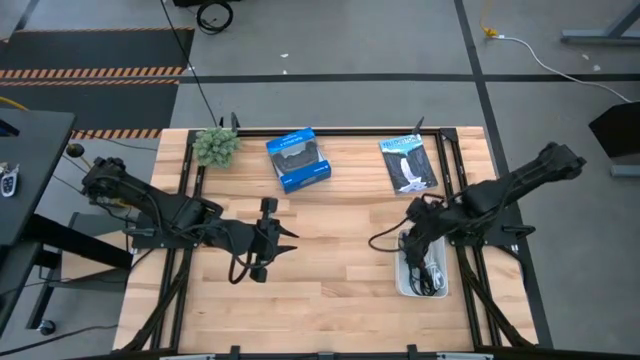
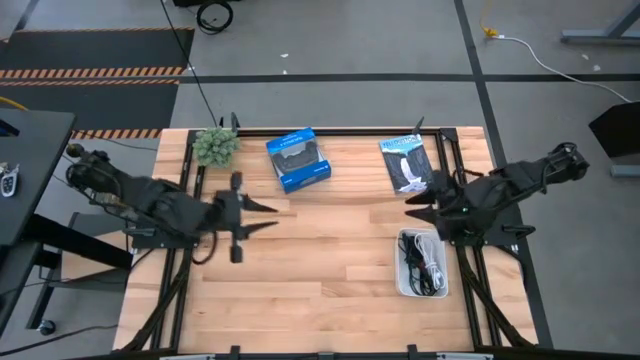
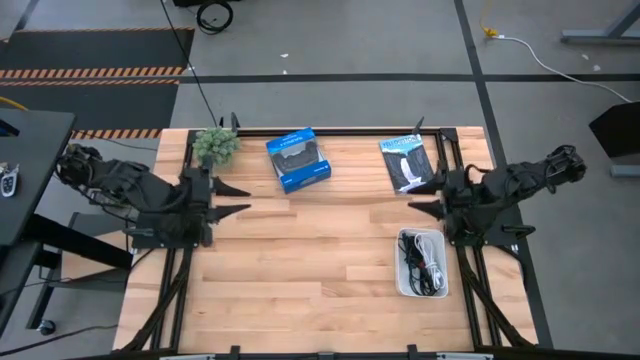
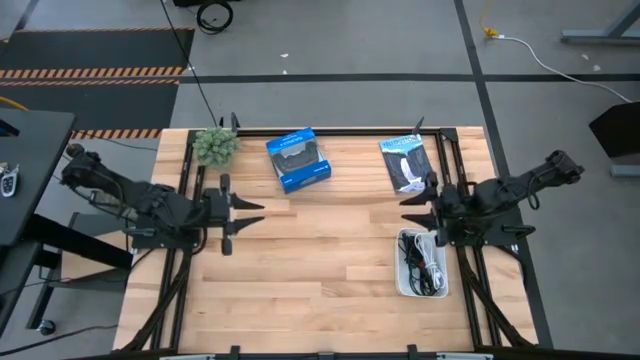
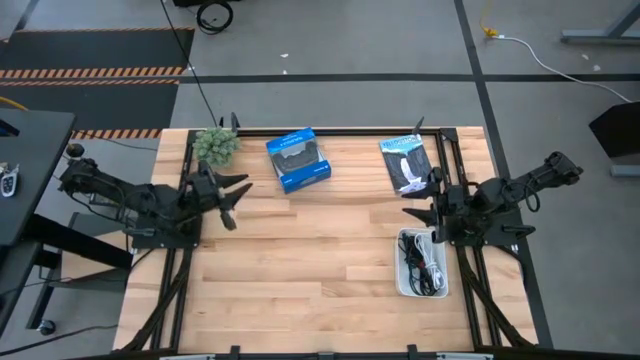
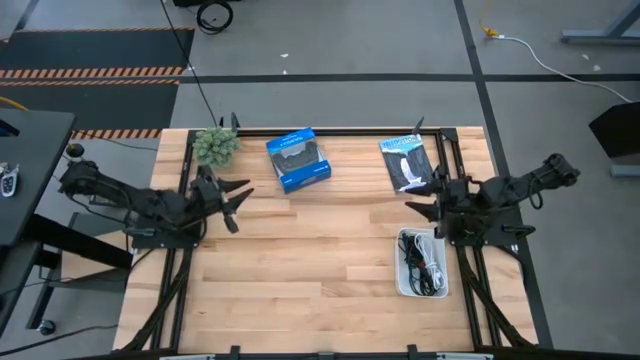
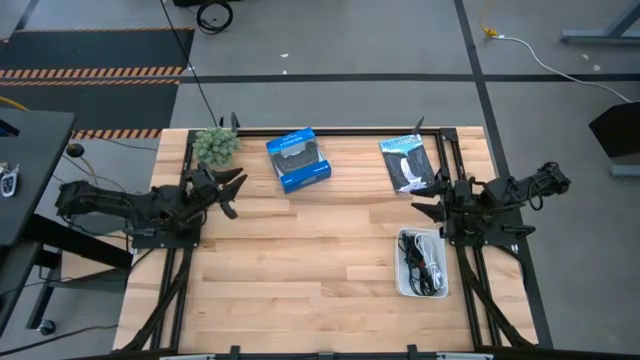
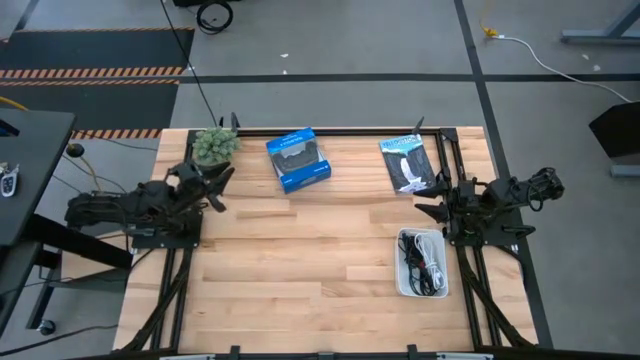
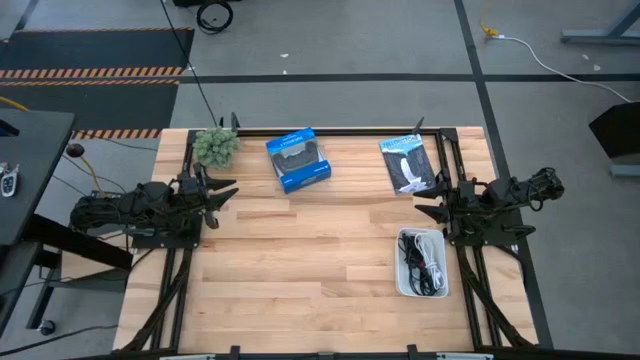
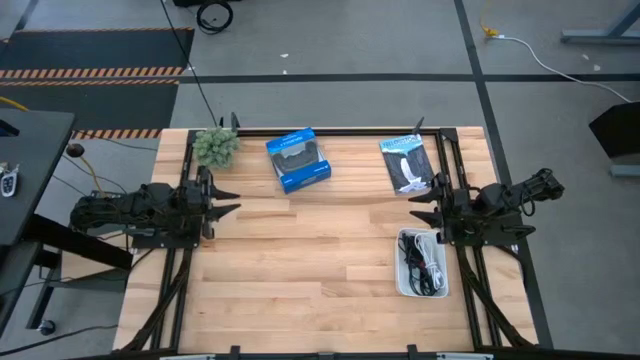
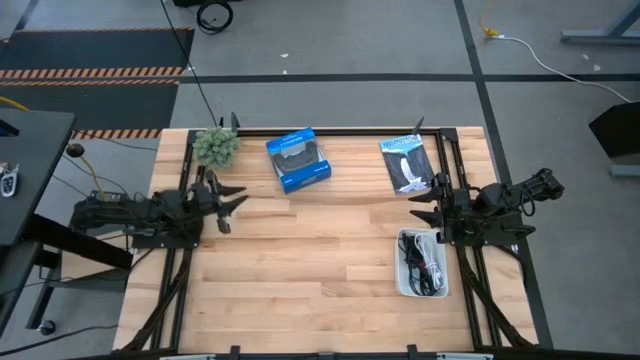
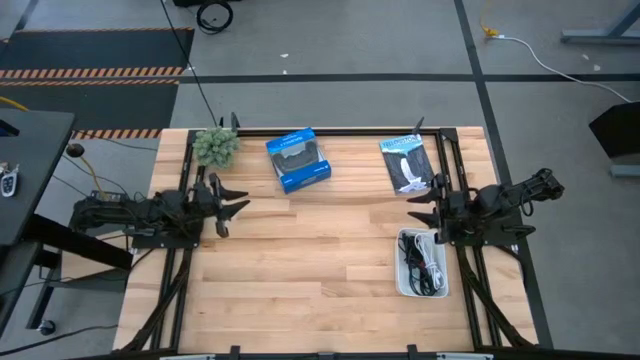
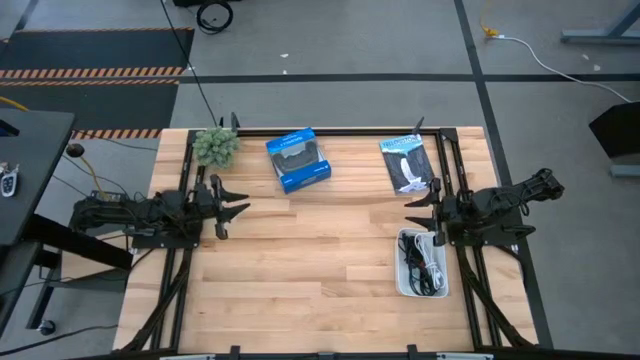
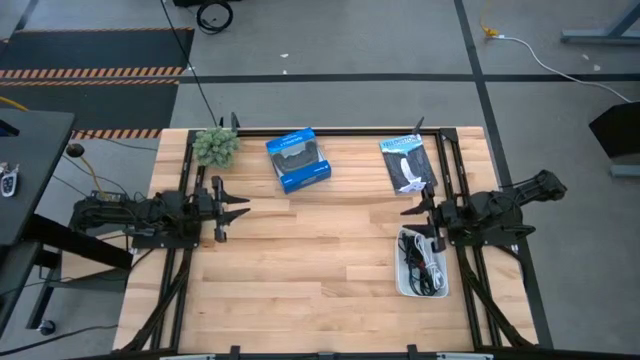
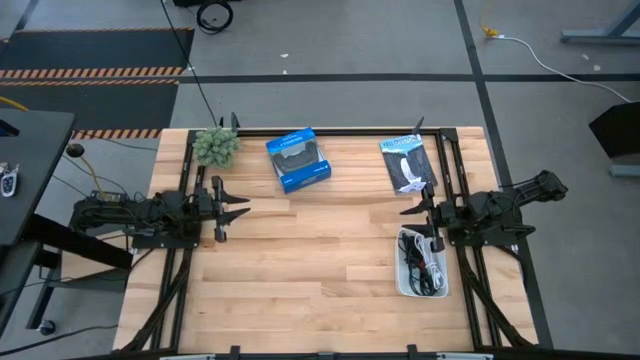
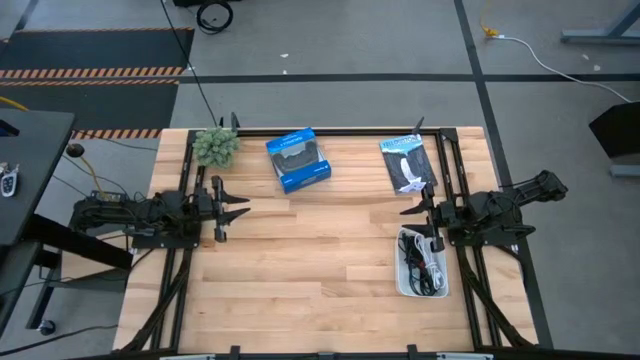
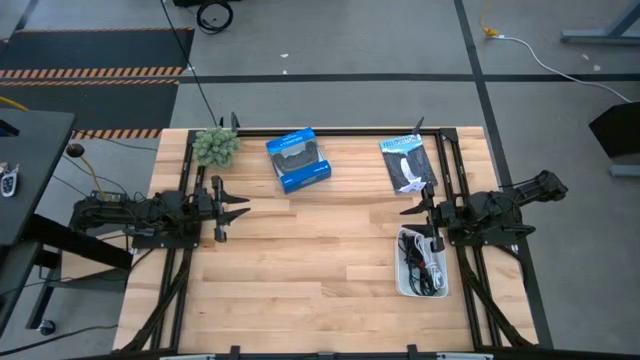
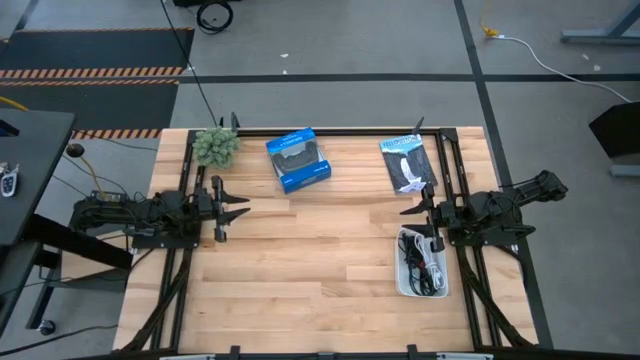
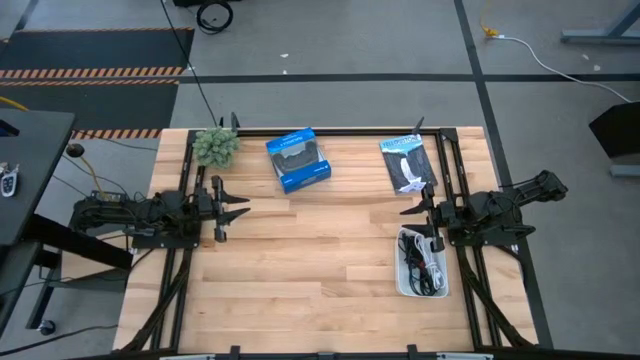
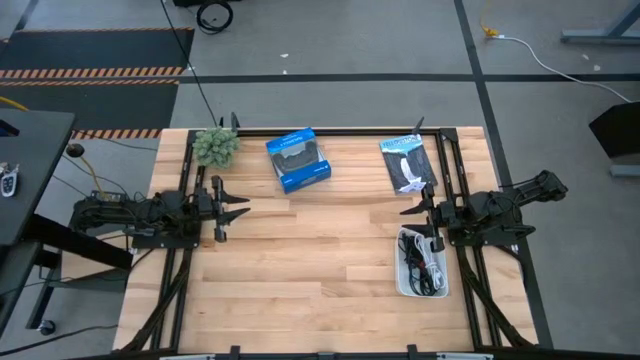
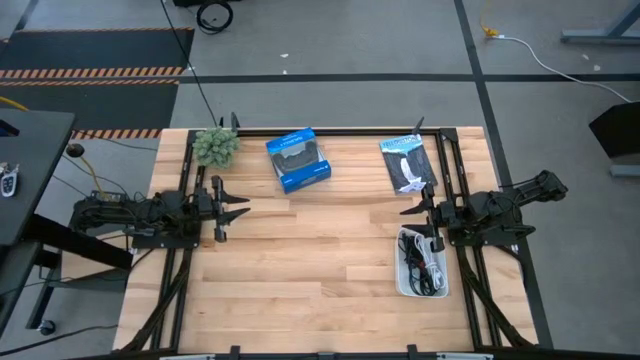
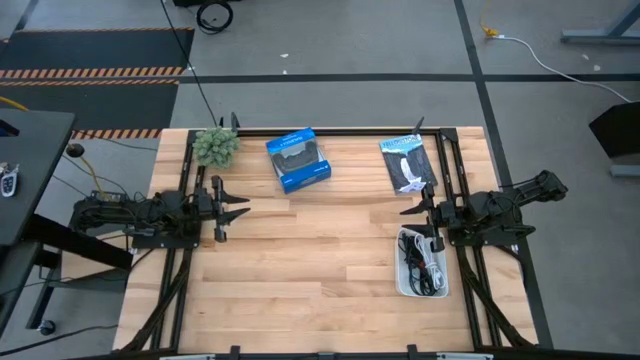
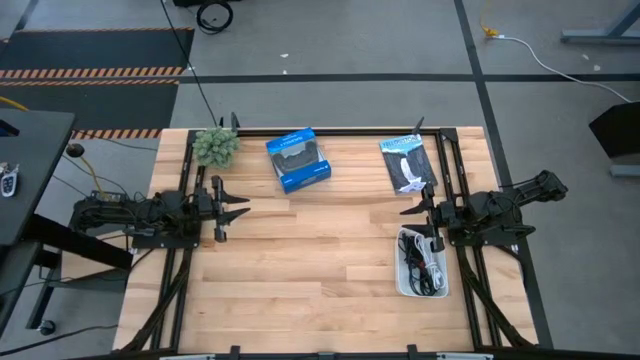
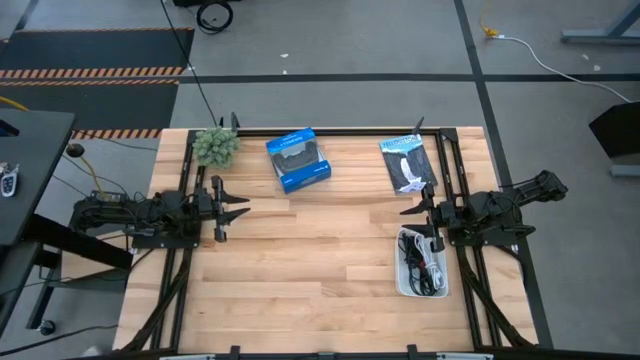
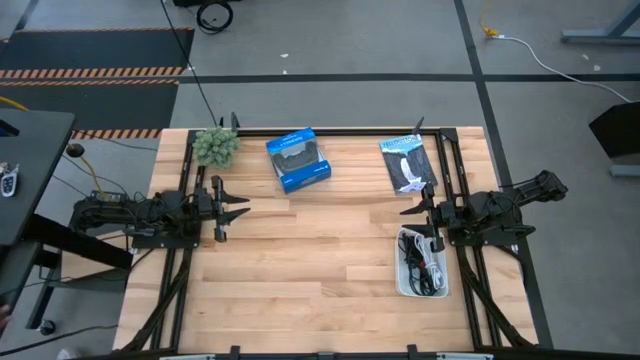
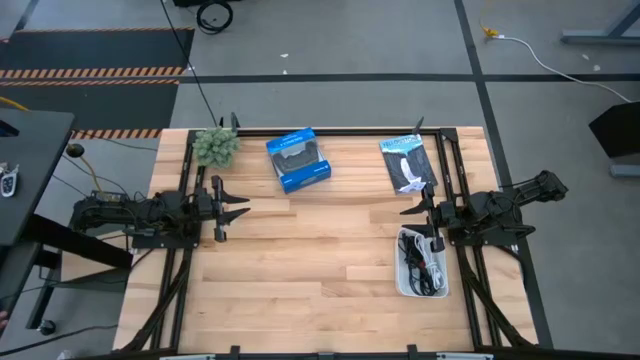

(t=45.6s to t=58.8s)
Task: Pick and place USB-C Cables
Return to Home Position

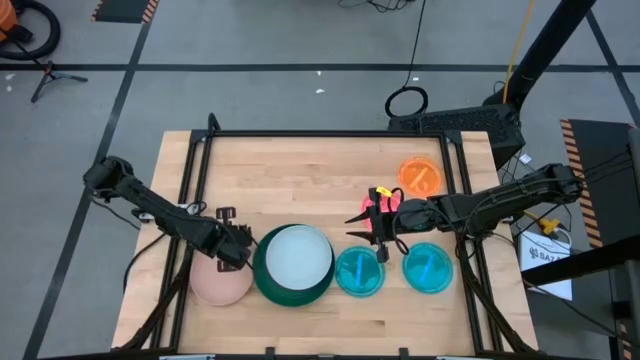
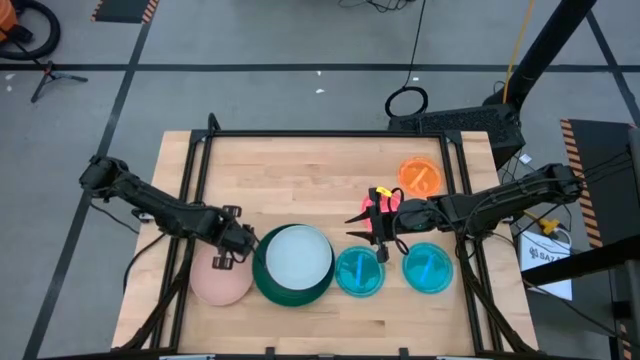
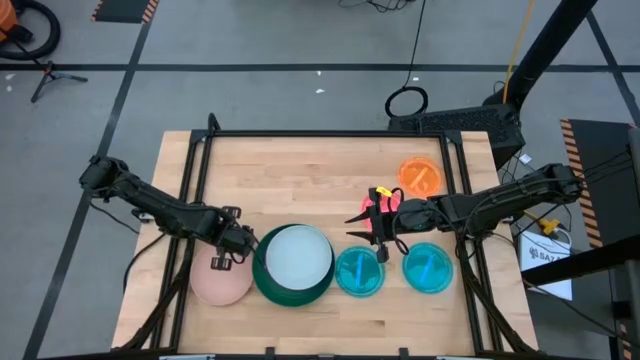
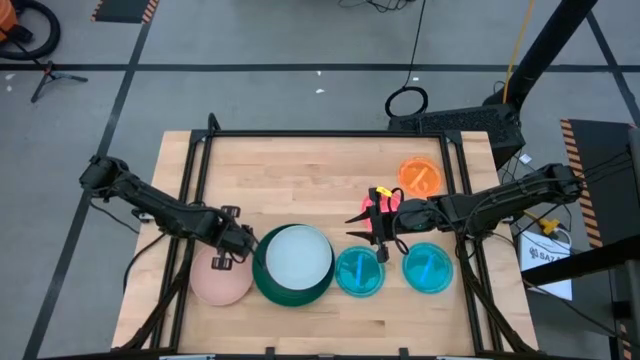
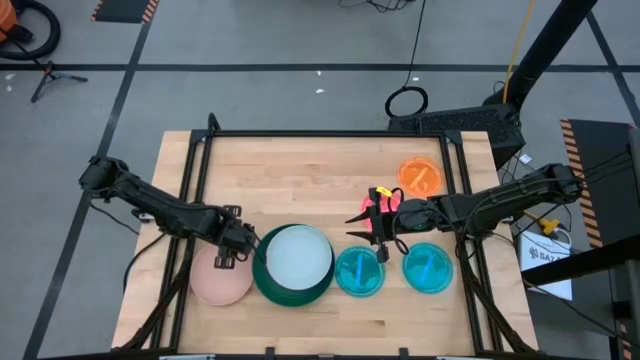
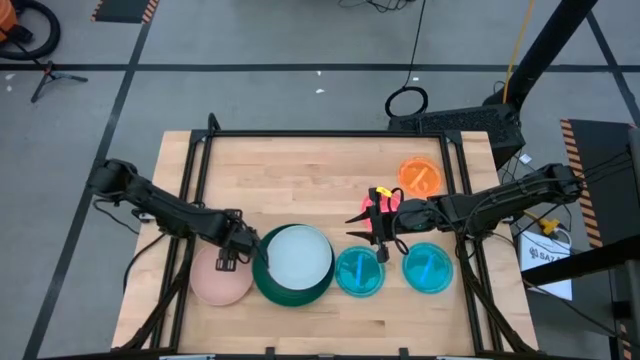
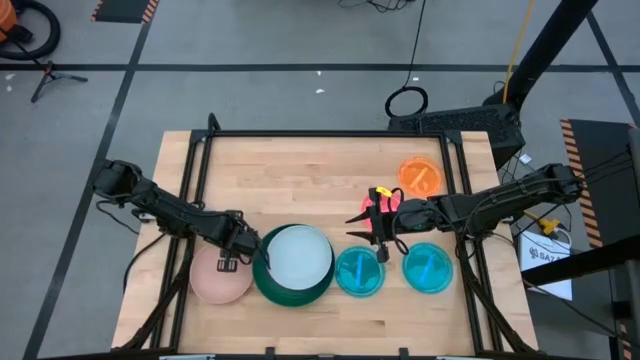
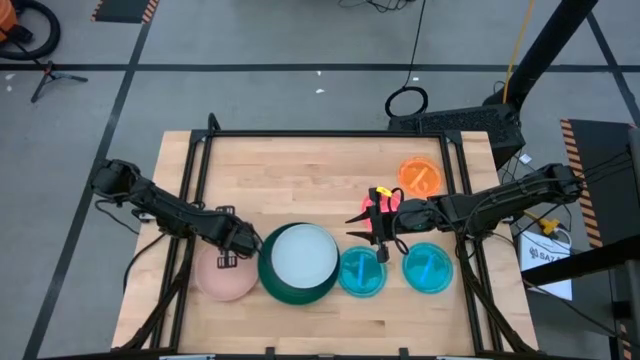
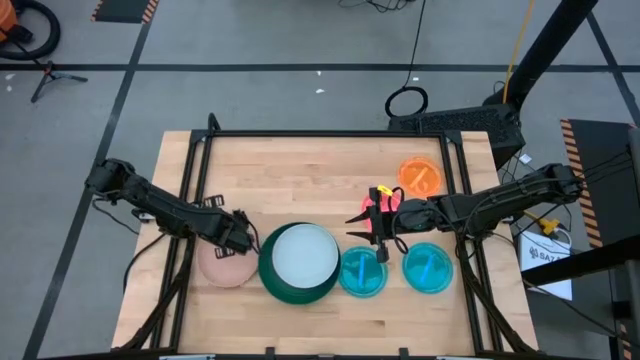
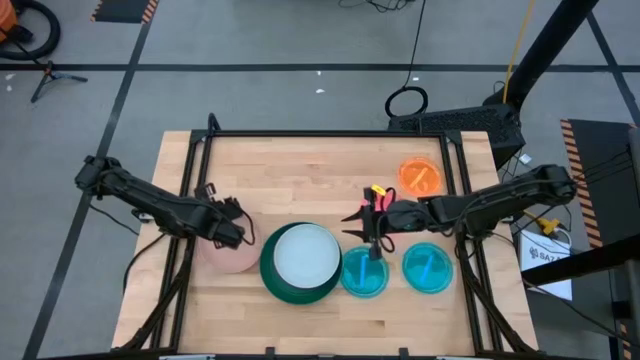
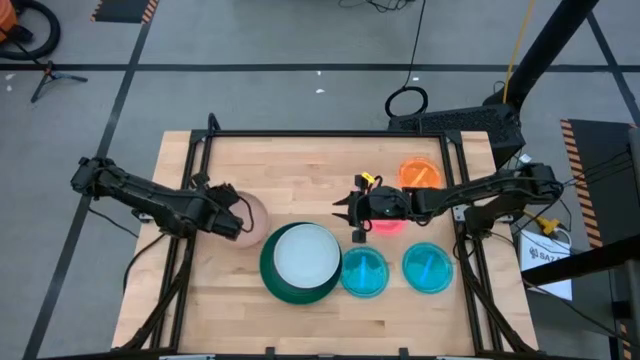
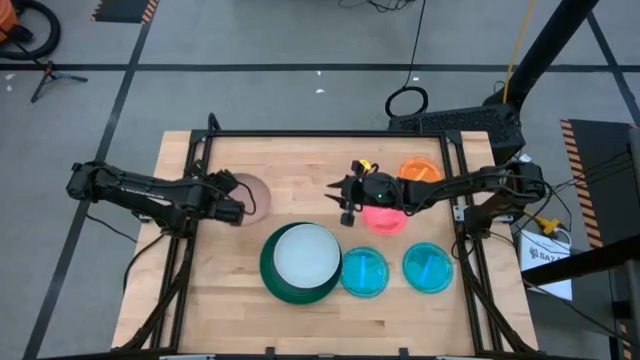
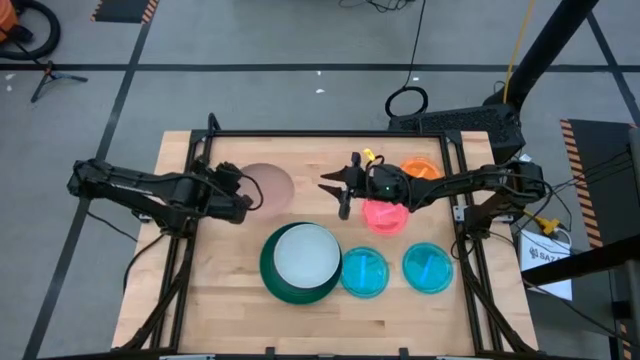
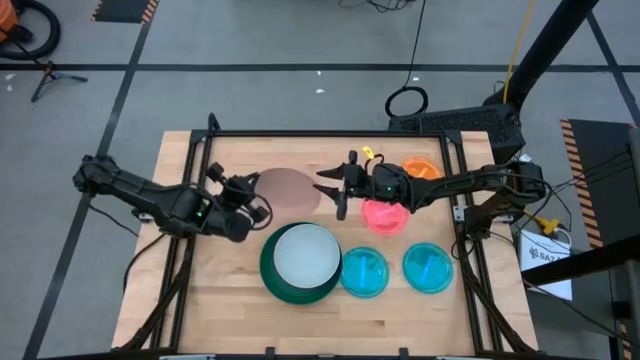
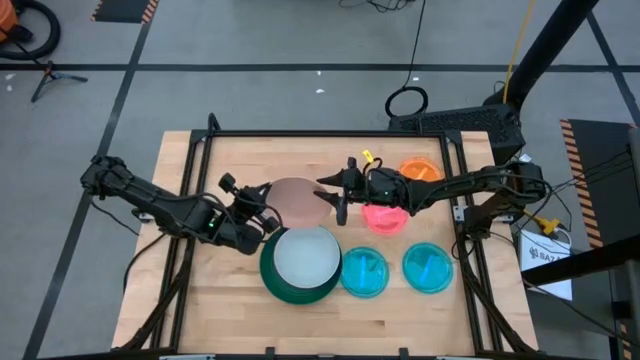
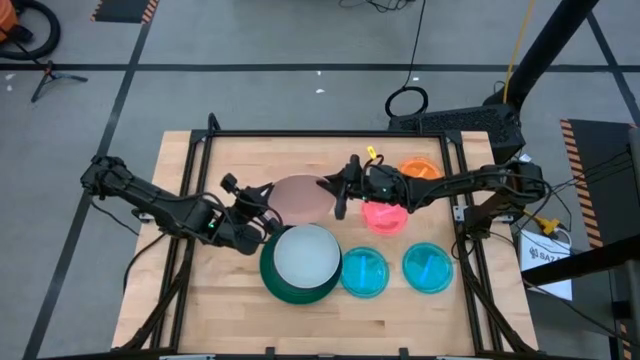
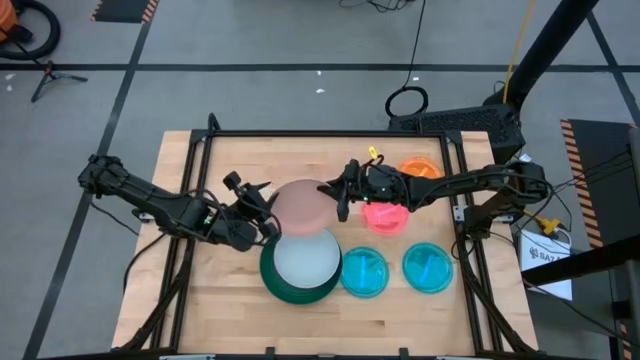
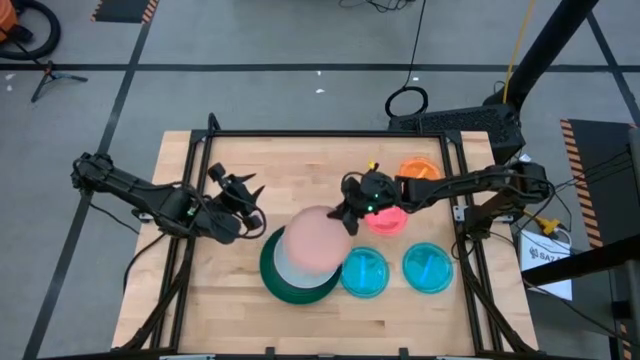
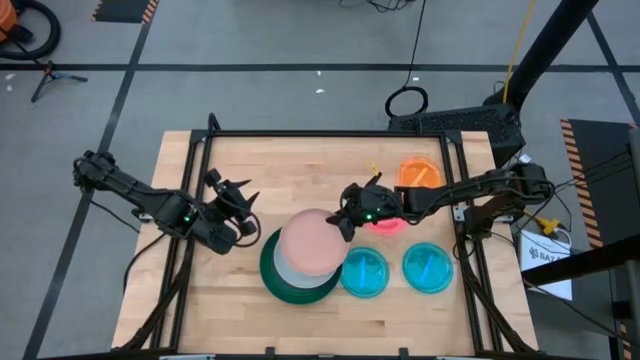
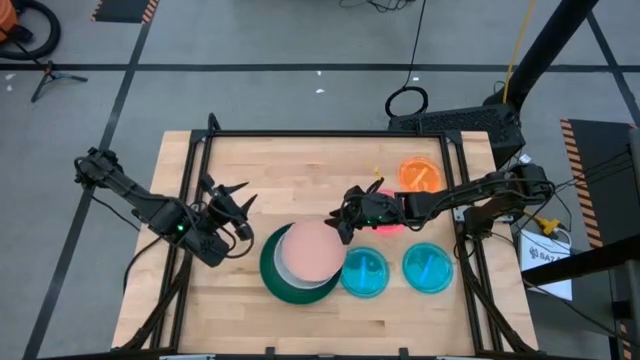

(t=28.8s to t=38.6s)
Task: Stack plastic plates
Stack the light pink plate on top of the light blue plate
